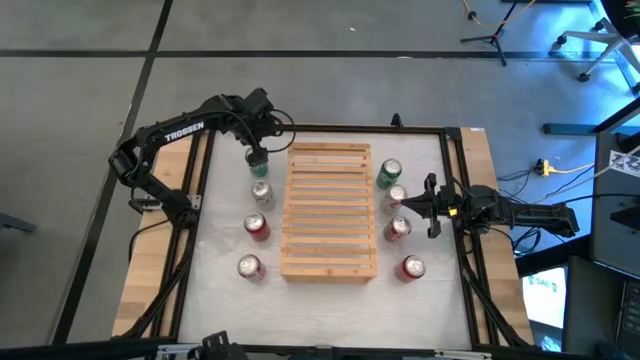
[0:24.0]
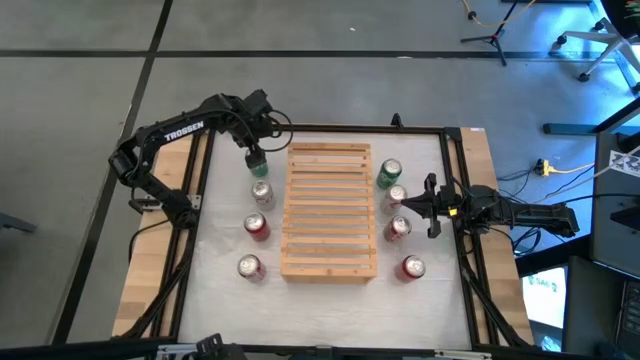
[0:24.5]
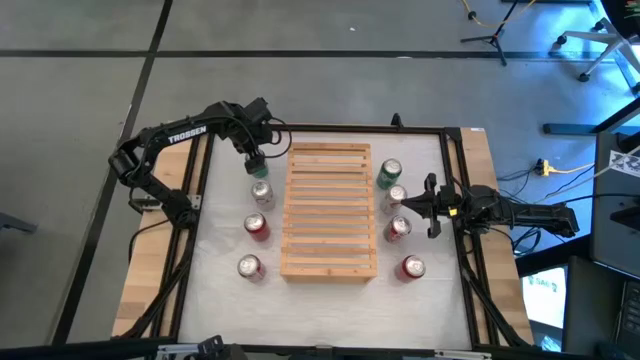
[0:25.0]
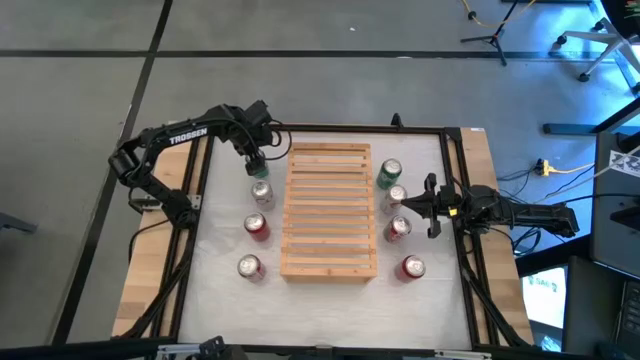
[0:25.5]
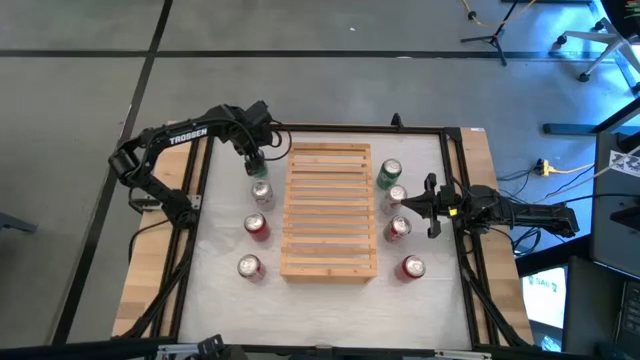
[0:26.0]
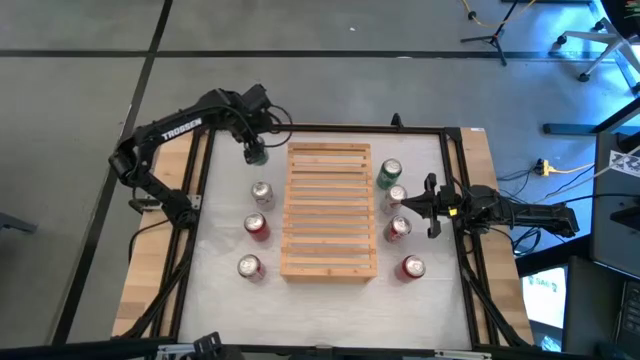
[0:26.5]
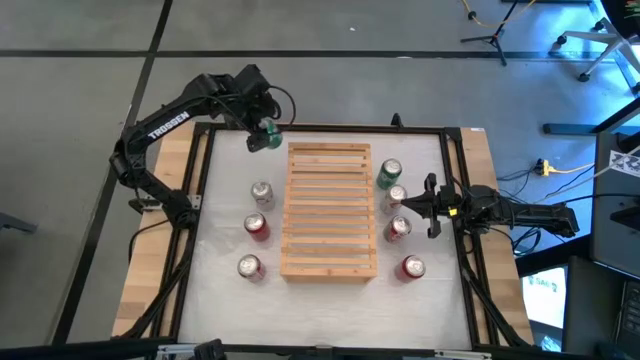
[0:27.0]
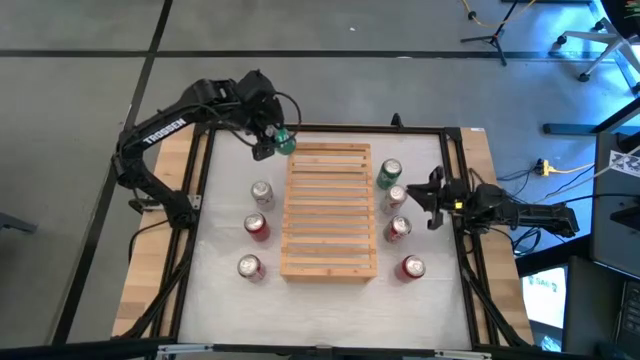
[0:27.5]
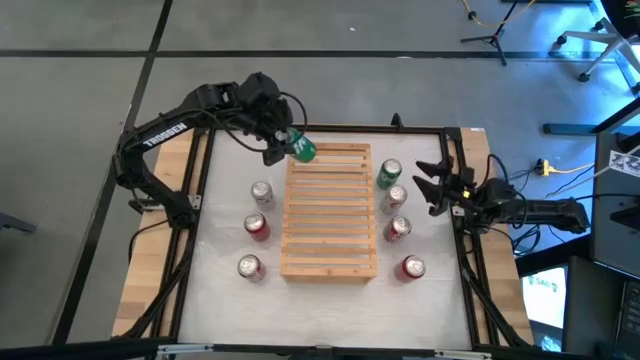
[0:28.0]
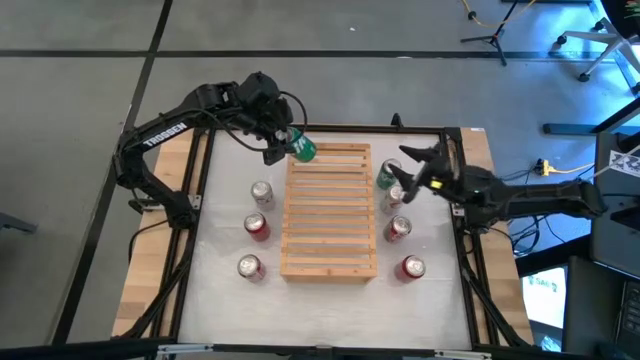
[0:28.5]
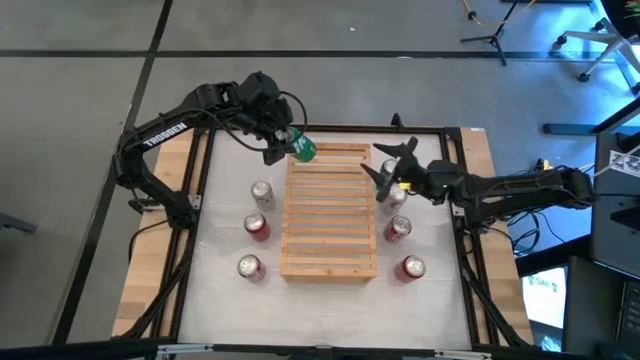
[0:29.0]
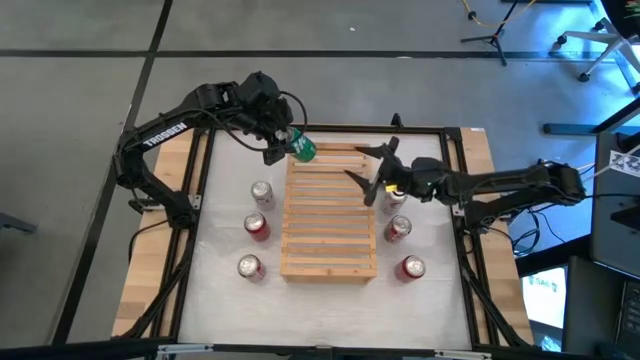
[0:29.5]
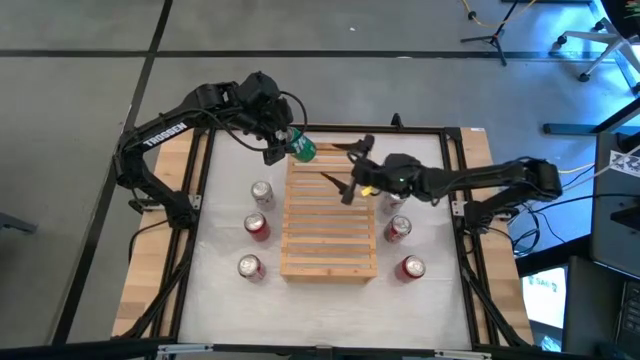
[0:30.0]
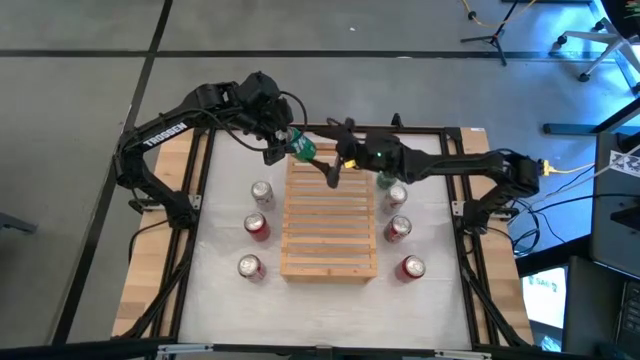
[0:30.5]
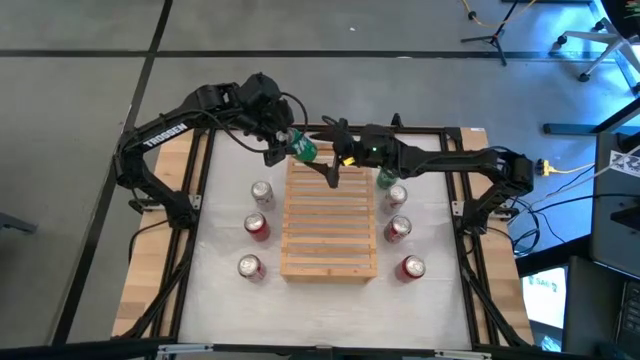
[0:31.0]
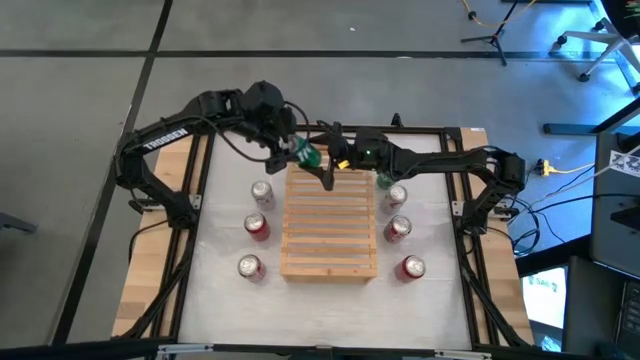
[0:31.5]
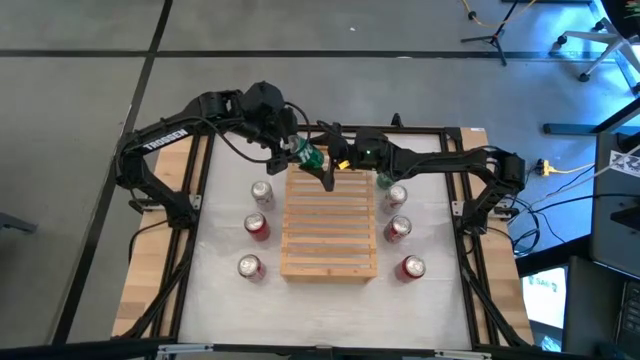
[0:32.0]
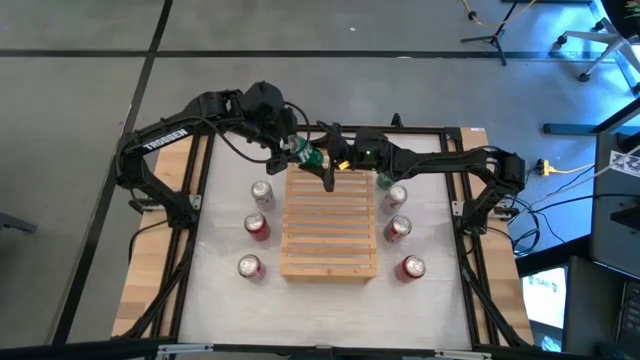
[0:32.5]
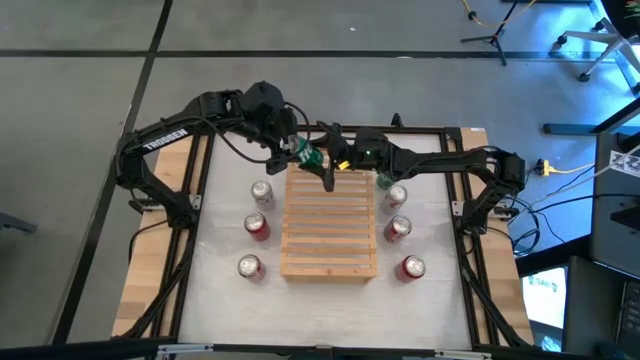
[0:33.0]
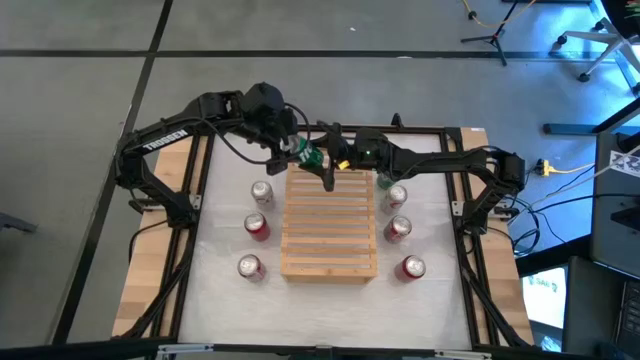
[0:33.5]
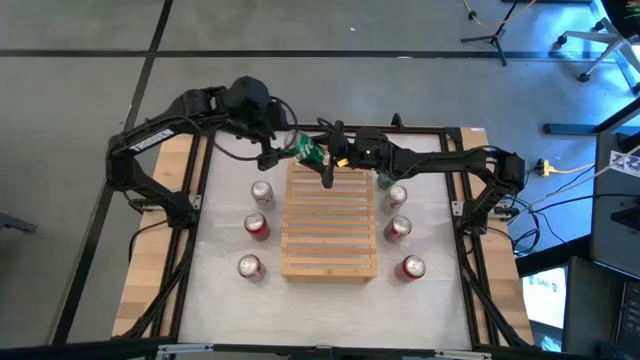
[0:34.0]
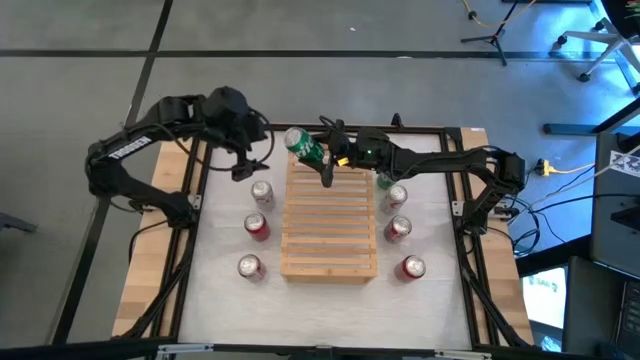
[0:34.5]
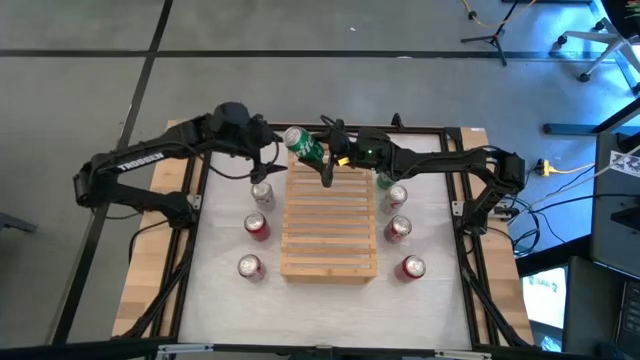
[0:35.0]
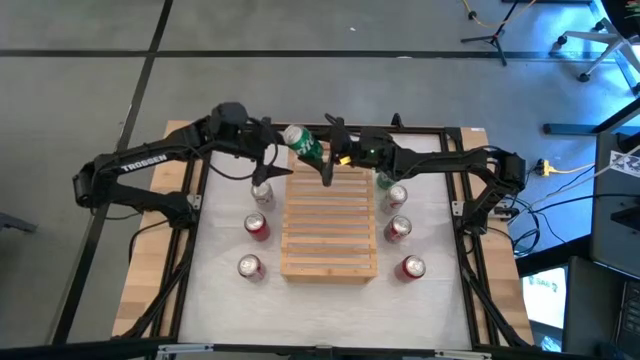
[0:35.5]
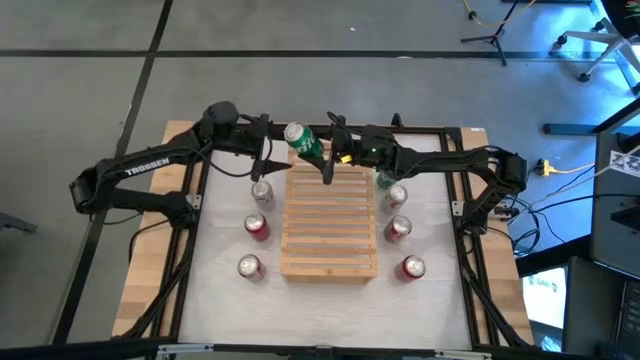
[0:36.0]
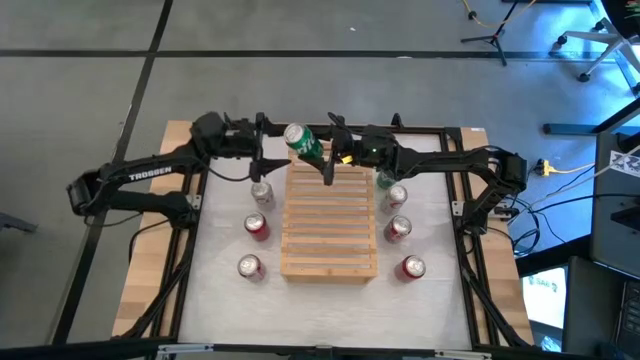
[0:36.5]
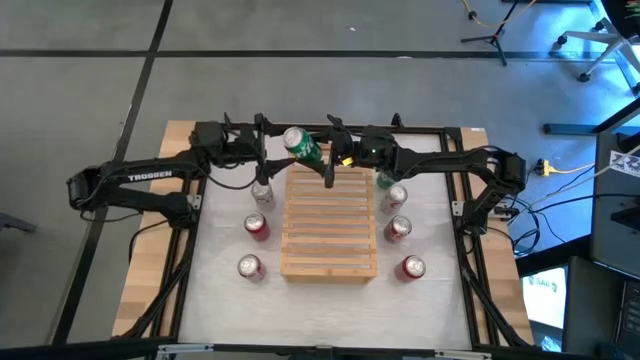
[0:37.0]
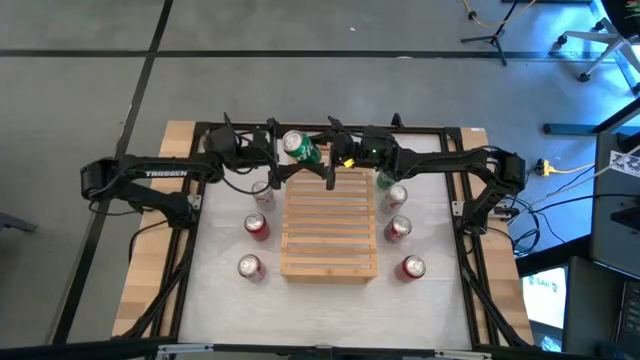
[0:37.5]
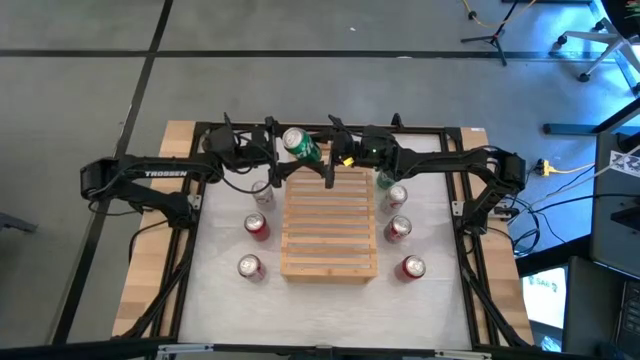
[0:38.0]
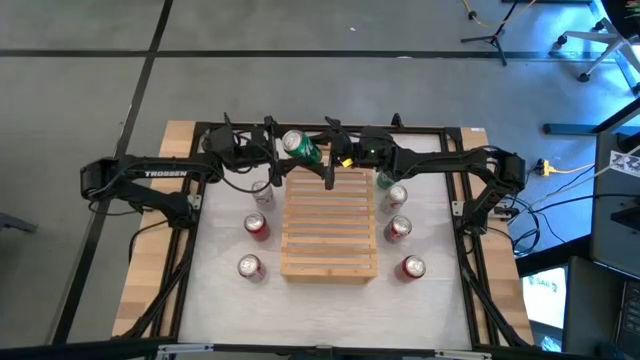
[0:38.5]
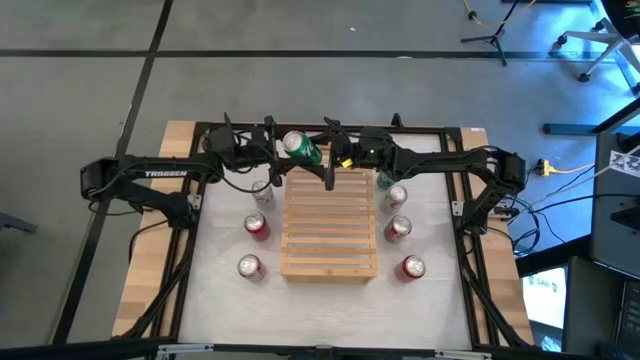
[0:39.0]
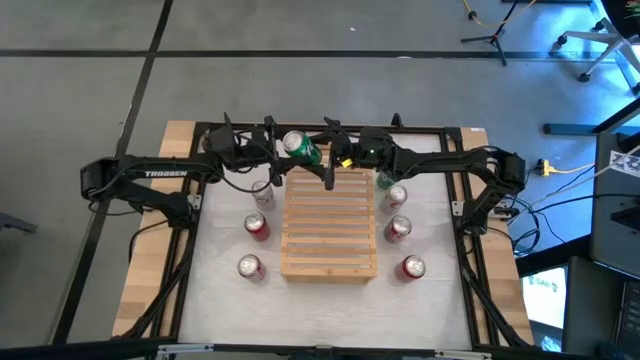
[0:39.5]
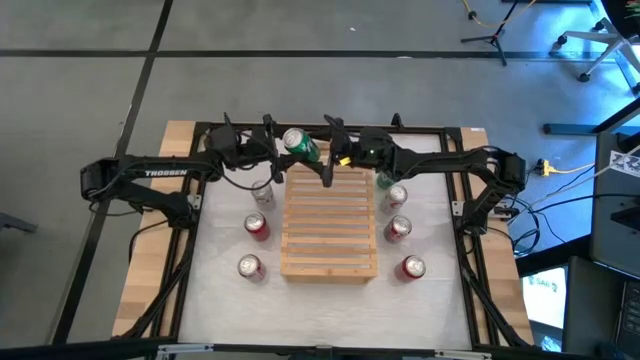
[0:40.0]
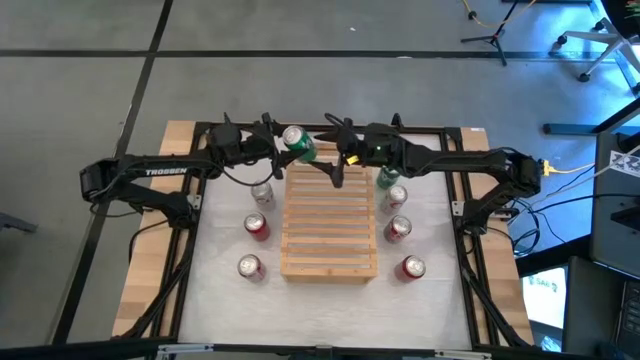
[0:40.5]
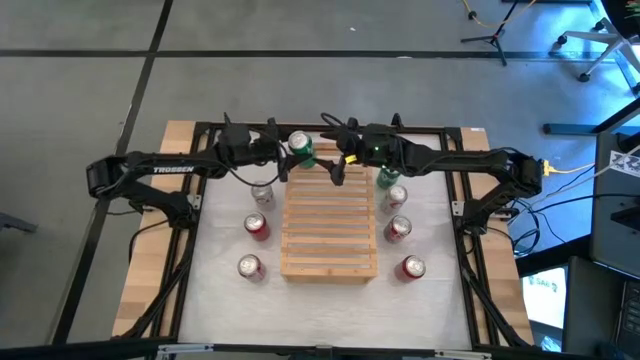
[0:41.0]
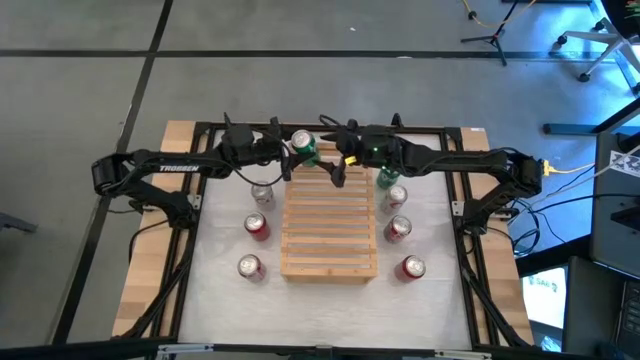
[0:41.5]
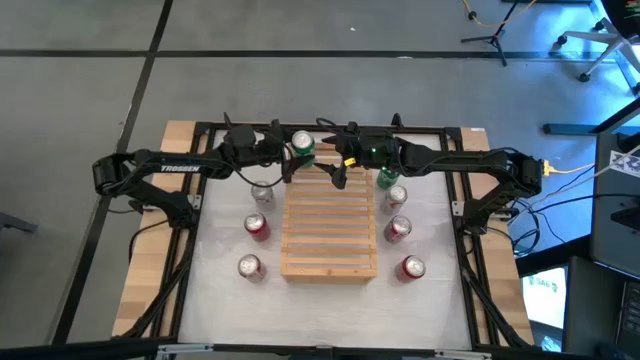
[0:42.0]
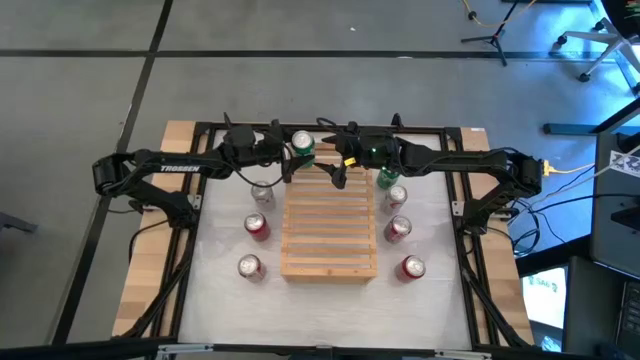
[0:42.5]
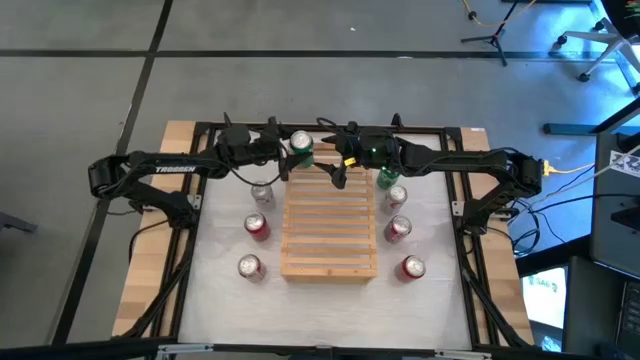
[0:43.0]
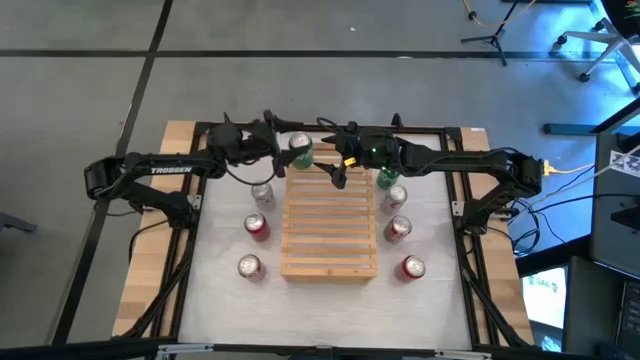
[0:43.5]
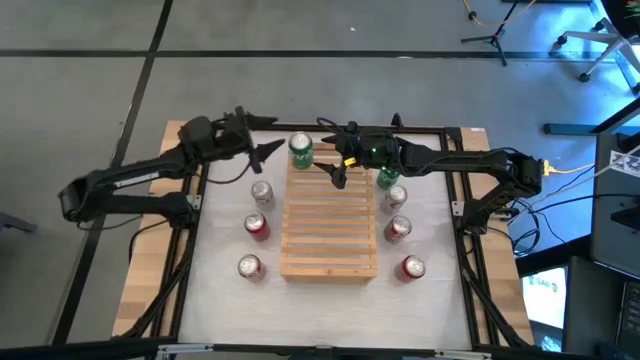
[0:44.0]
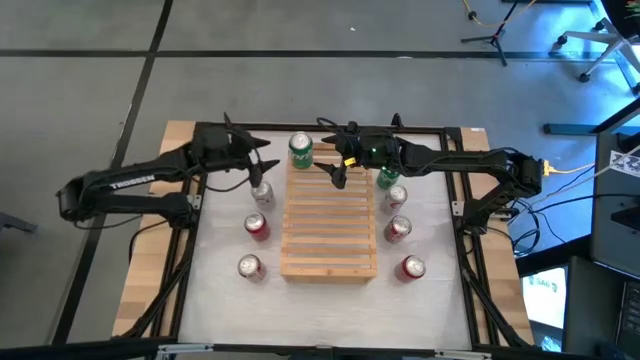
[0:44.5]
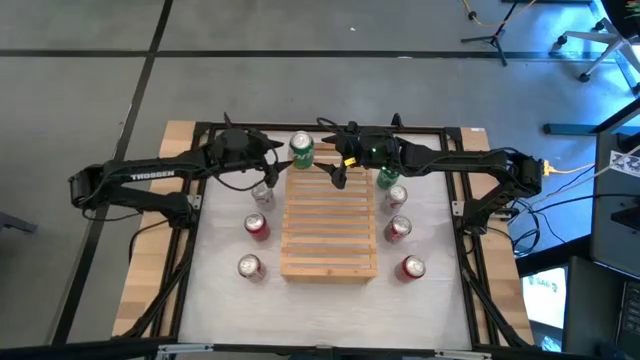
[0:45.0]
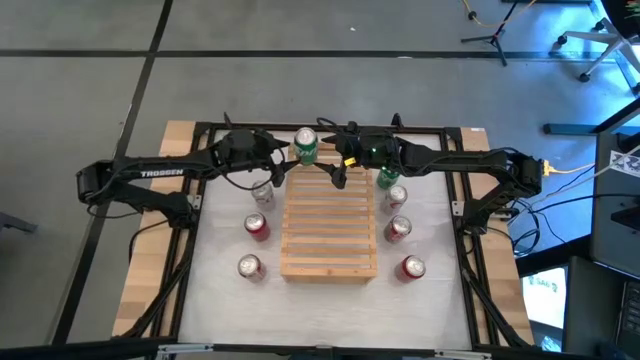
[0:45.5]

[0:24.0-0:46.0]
Task: Place canned beverage on shelf
Put the left green soda can on the shelf
